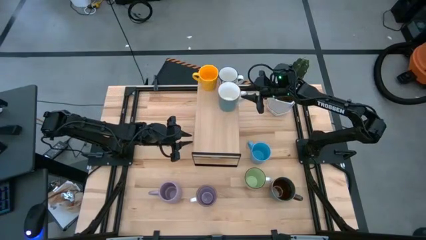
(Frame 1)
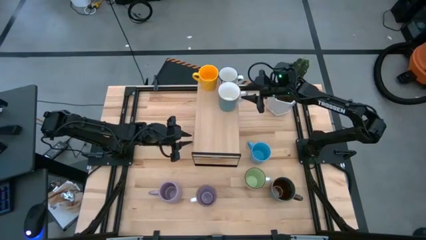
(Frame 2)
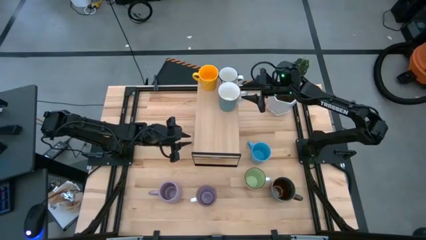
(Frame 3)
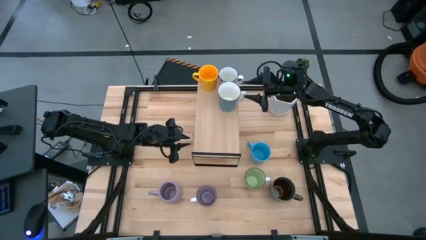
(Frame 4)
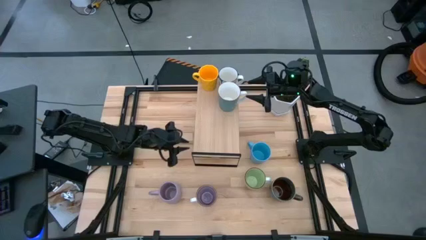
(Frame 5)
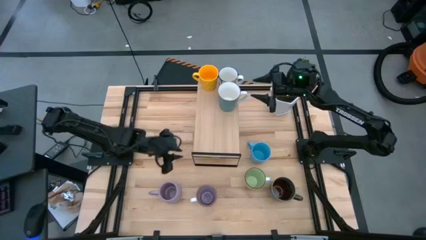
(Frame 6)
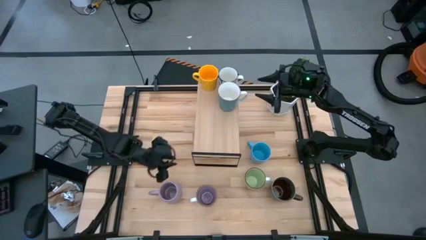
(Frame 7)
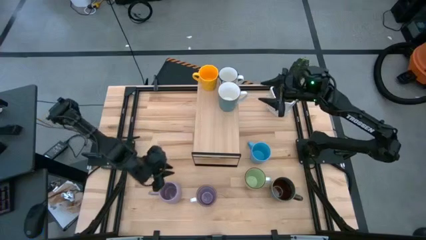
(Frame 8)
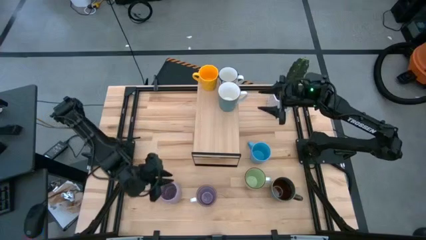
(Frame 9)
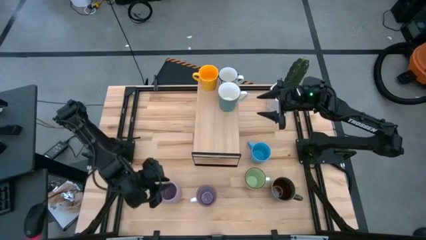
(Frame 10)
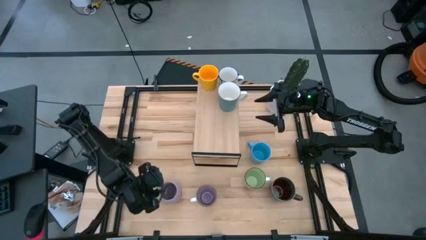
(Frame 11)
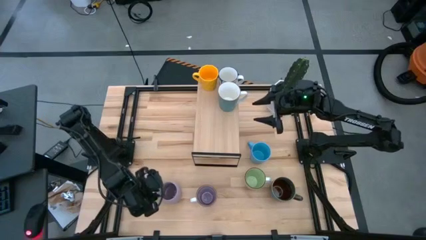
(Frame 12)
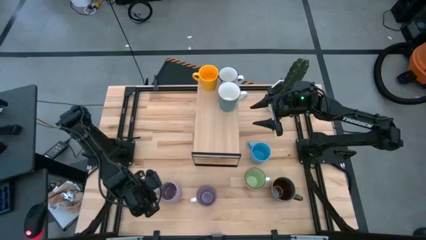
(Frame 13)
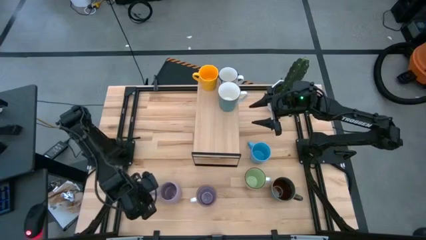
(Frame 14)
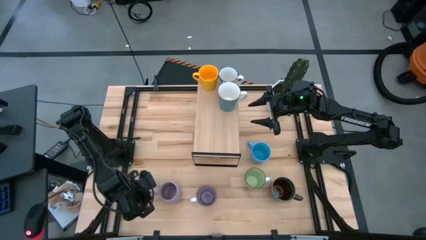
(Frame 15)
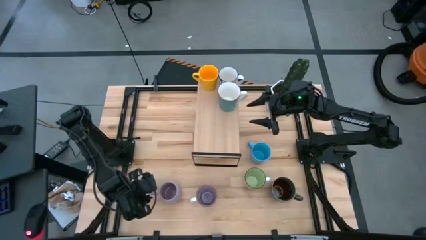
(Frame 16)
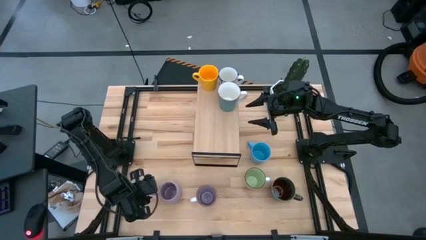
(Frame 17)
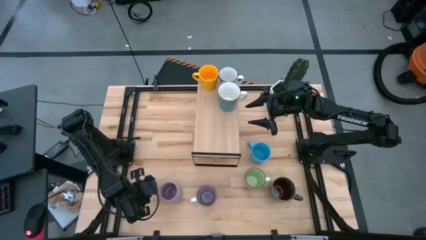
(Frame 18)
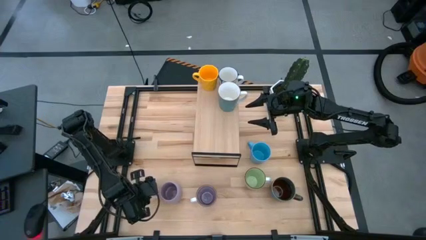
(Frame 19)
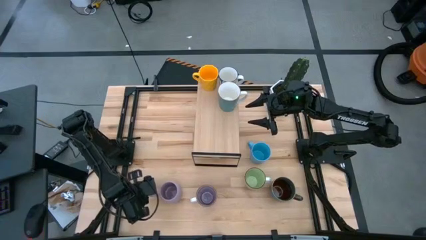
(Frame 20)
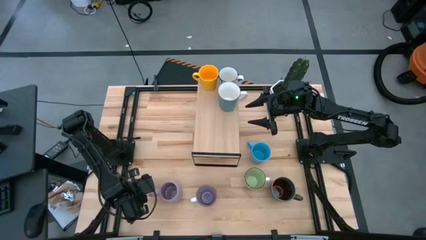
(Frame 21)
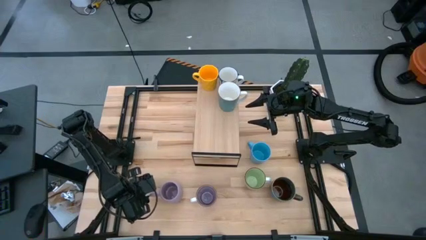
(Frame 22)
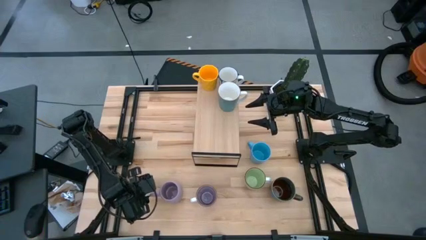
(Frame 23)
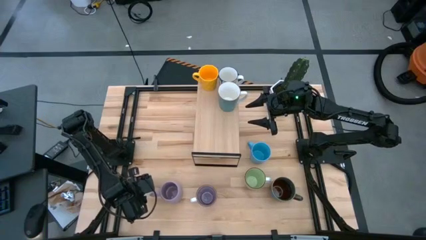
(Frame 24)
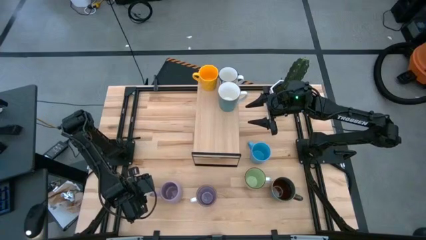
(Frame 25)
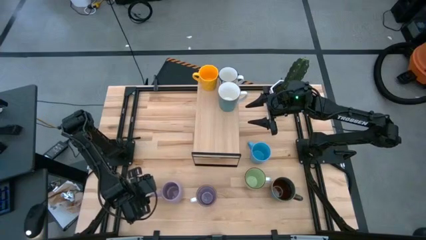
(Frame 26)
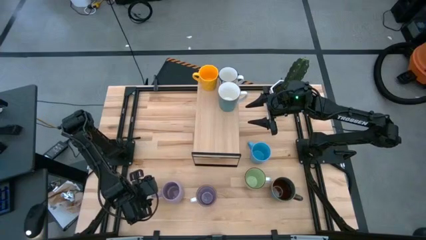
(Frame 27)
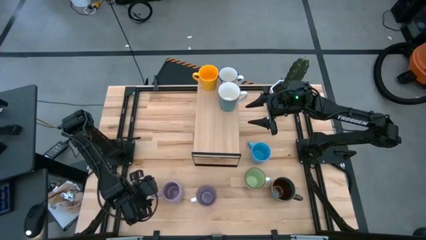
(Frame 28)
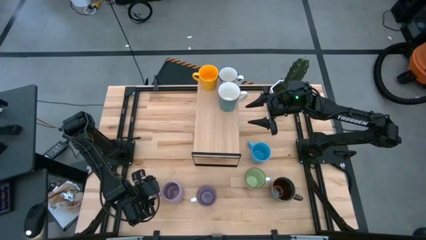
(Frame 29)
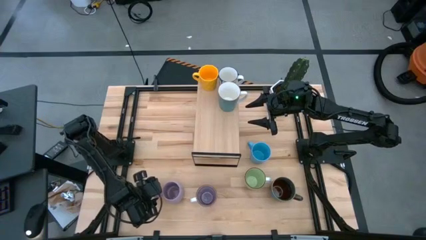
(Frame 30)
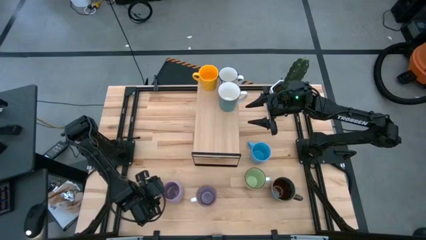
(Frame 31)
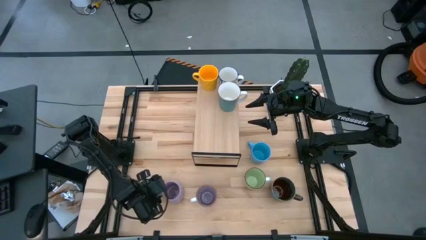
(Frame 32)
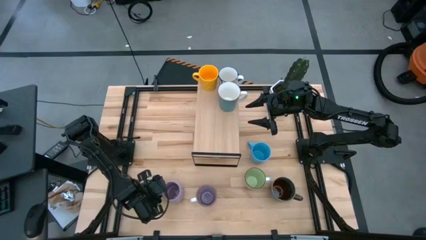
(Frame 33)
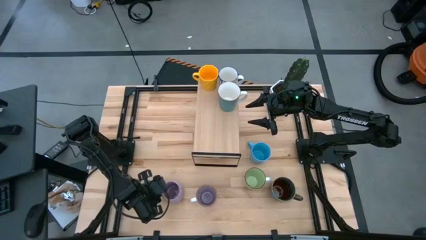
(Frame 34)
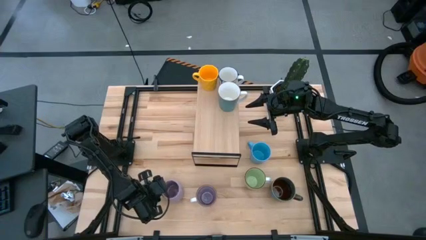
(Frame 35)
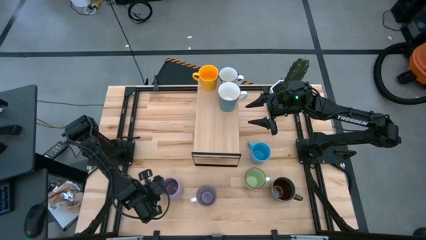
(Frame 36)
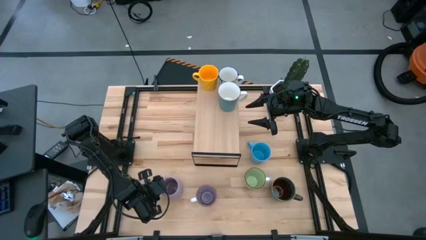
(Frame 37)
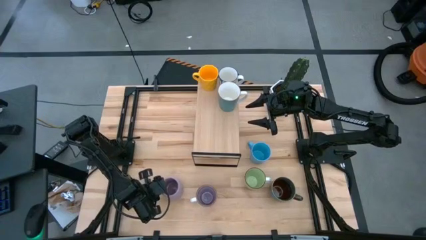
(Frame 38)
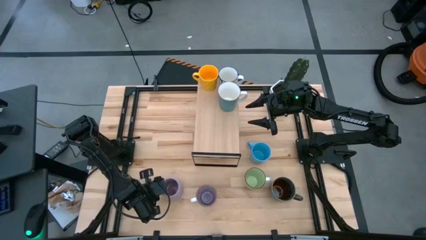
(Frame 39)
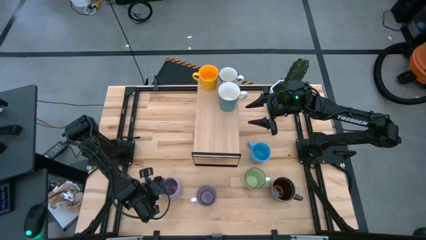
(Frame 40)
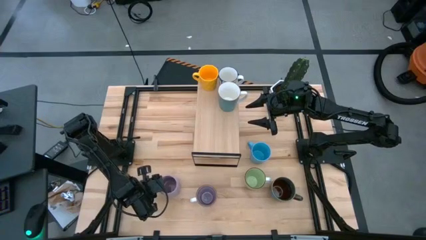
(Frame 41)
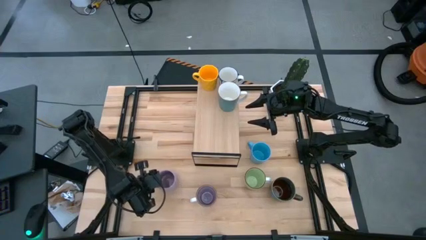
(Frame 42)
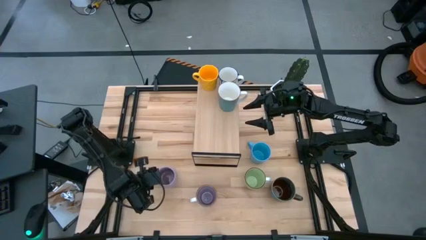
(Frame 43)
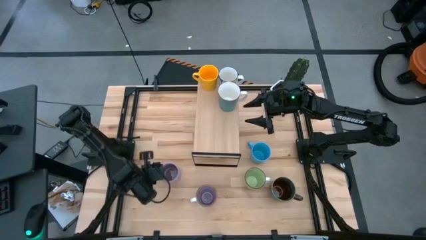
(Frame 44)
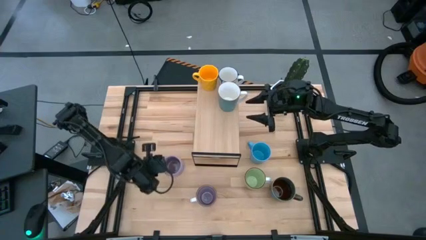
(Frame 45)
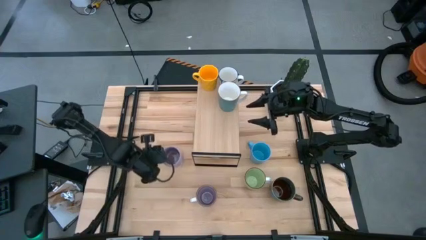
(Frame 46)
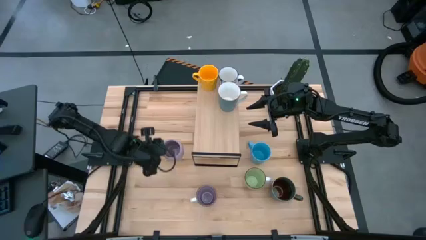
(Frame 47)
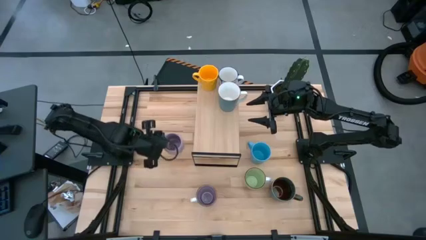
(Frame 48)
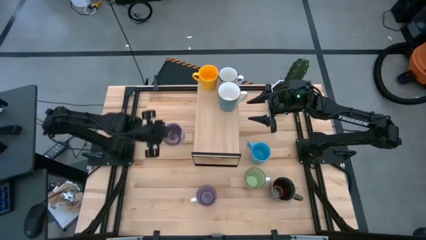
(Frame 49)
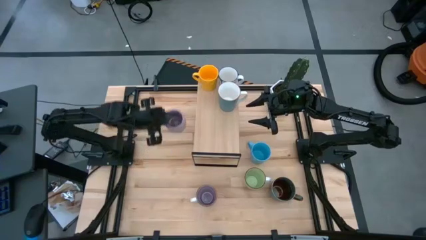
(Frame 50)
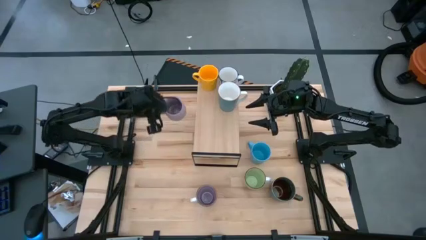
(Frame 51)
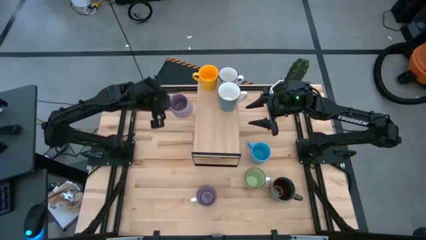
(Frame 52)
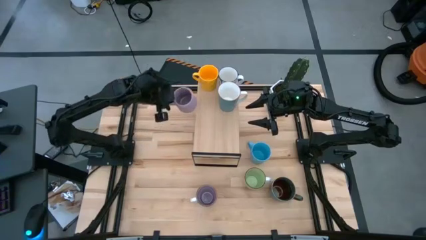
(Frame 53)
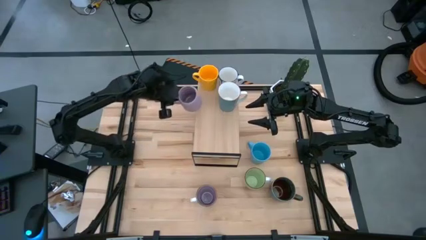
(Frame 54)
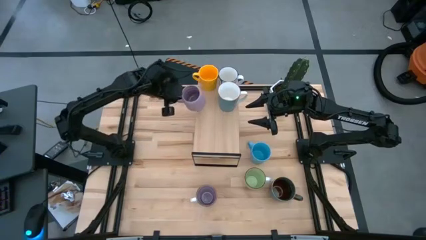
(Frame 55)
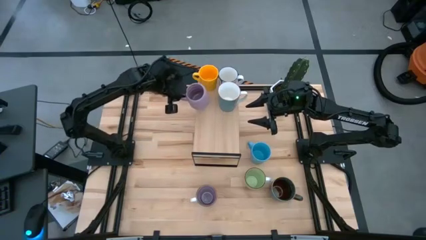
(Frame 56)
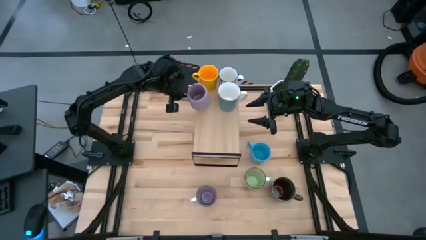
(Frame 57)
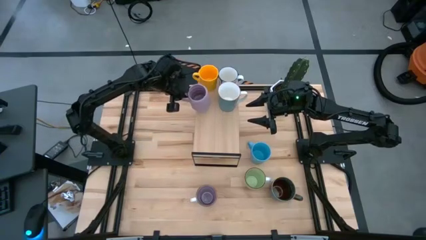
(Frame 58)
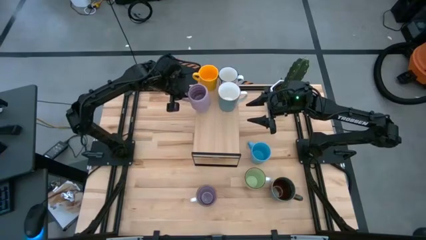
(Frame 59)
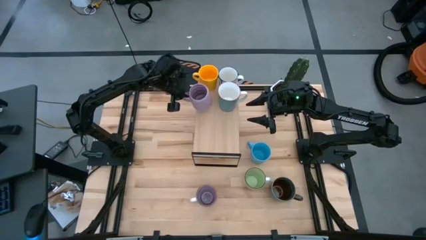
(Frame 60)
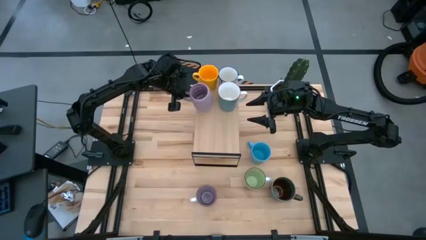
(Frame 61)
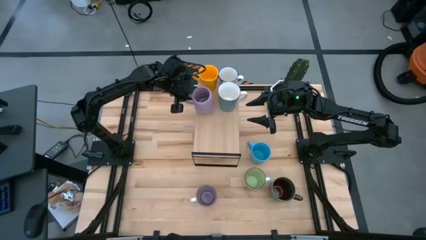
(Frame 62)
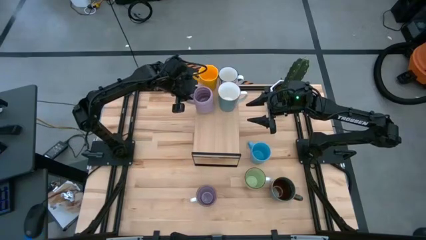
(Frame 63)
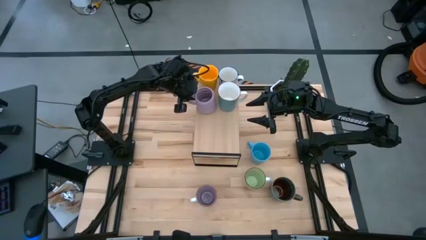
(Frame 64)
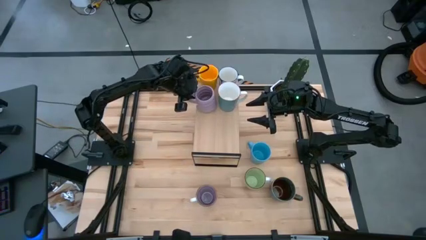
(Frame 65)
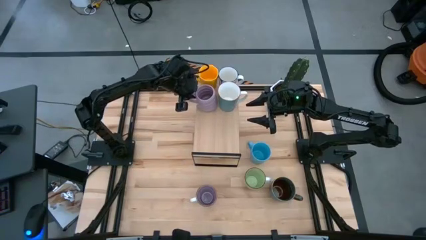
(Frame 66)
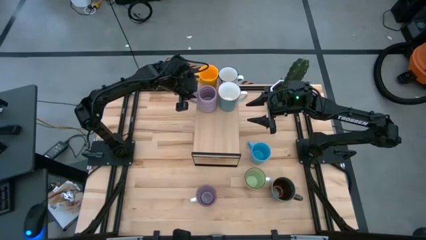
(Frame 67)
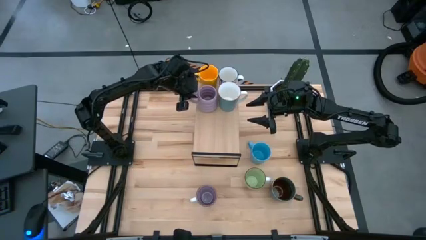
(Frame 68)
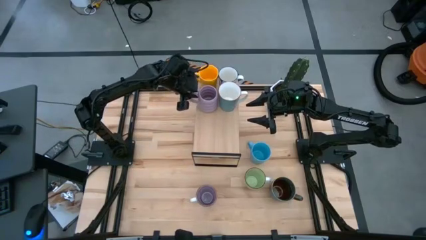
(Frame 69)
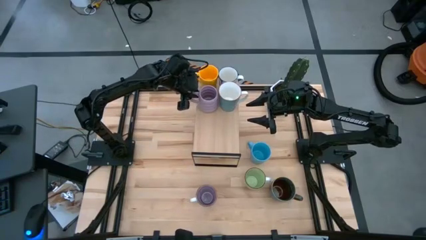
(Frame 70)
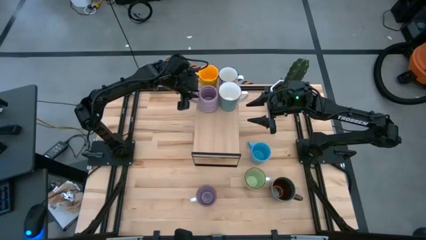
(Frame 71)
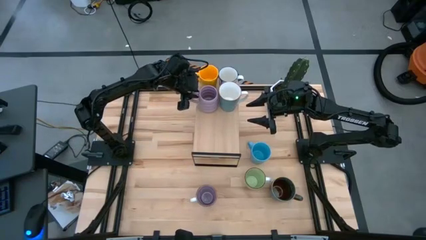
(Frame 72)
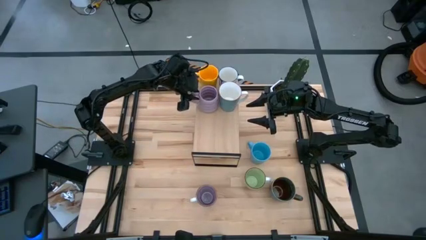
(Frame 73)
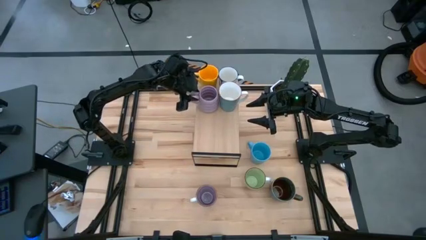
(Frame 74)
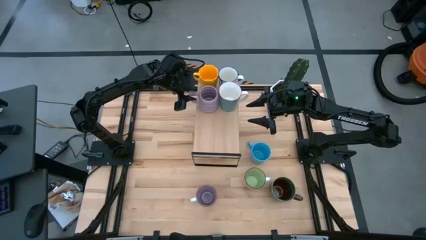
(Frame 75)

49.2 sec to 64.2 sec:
Task: Place coffee mugs
Put the left purple mug on the shelf
